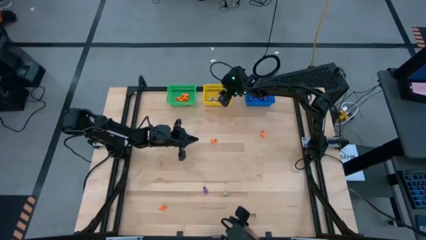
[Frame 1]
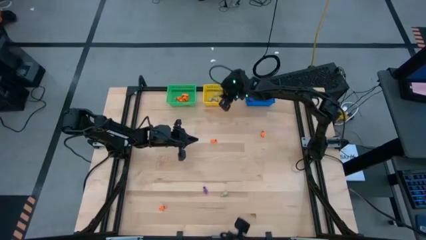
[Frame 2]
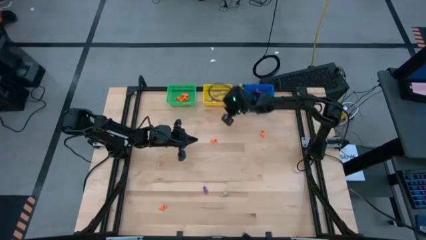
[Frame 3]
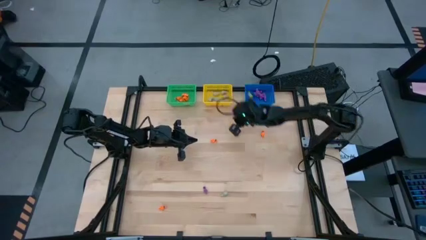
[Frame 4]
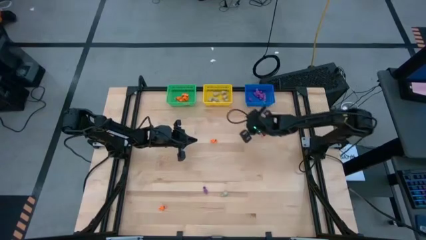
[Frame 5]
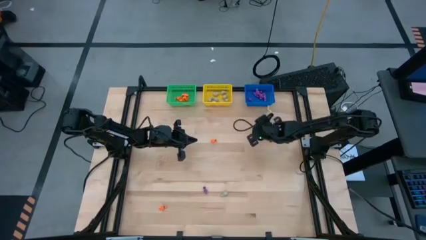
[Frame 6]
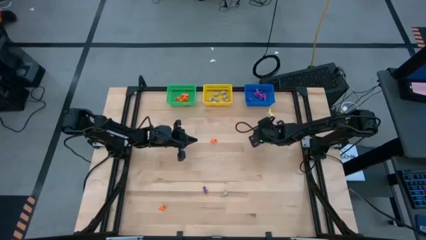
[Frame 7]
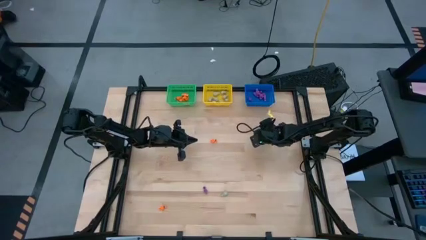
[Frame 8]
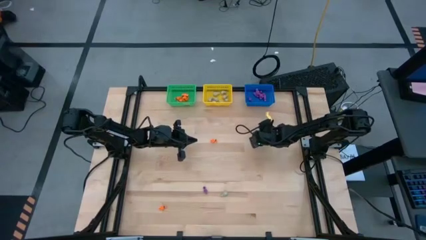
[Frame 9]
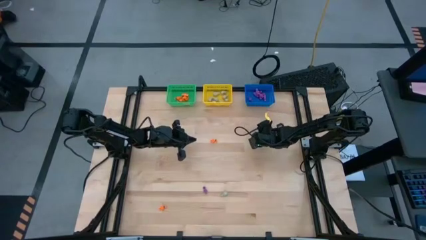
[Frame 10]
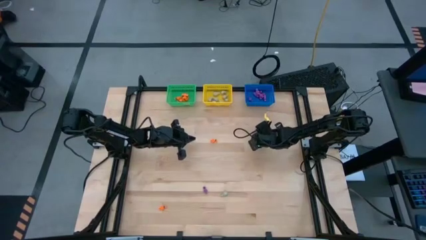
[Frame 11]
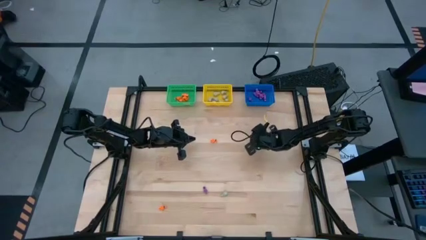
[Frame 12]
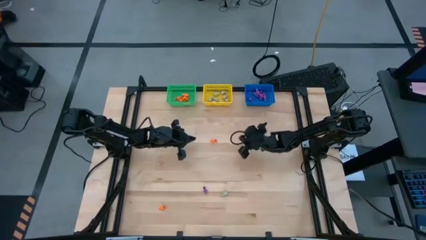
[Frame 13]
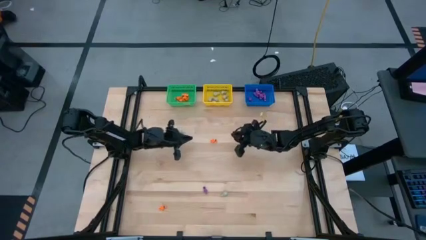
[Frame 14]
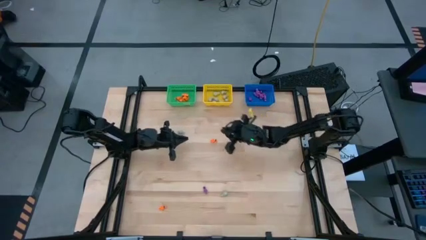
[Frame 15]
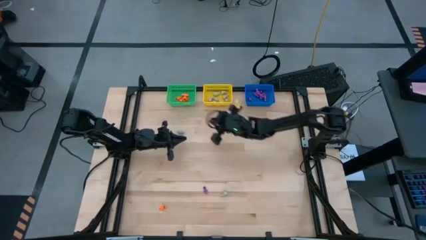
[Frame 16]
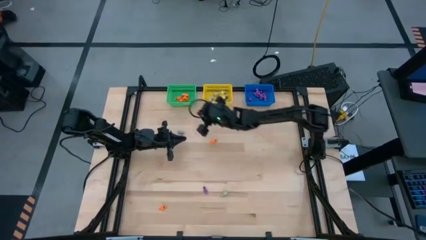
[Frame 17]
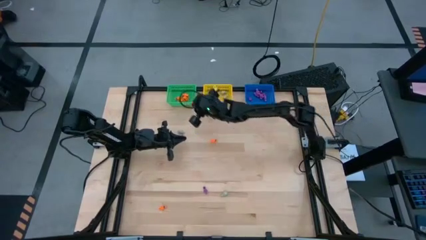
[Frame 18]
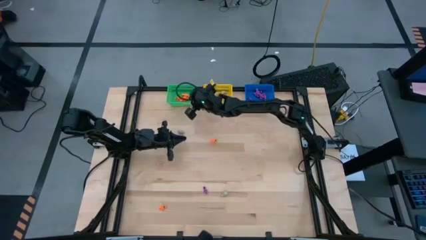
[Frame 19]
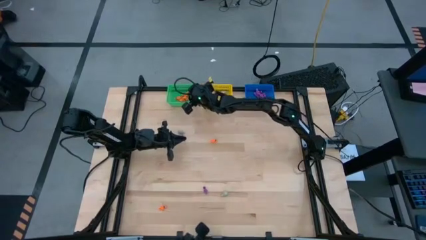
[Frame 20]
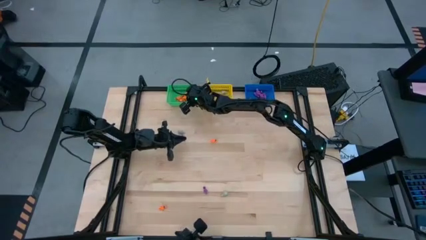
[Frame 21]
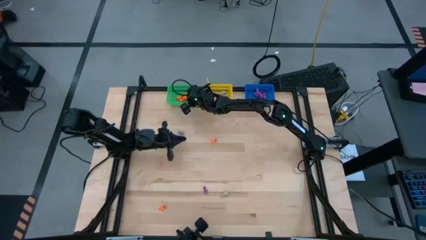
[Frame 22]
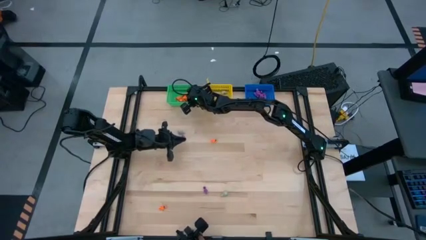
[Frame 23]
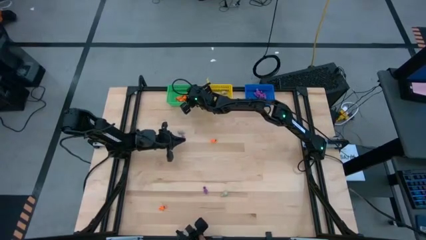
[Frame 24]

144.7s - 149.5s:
Task: Sort Halloween decoration
Put the orange skeleton toy into the green bin

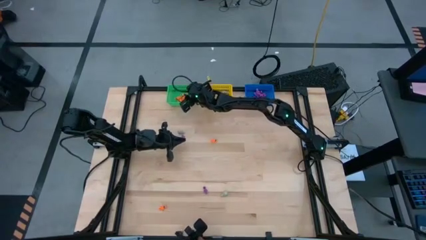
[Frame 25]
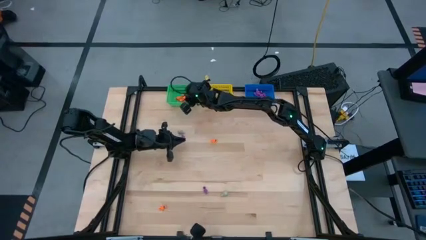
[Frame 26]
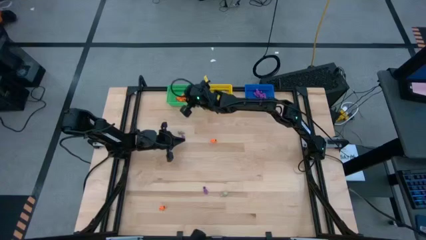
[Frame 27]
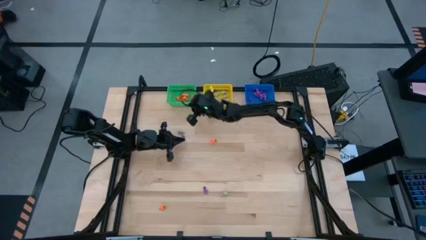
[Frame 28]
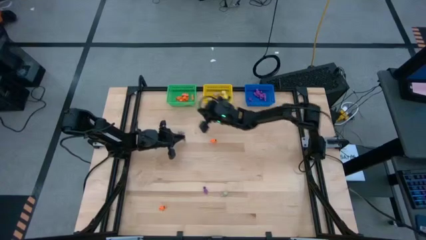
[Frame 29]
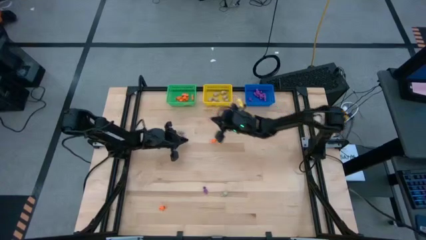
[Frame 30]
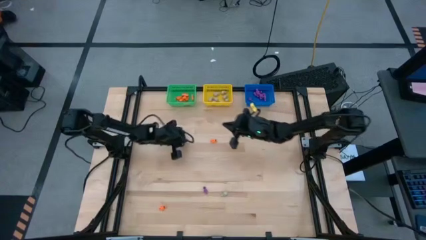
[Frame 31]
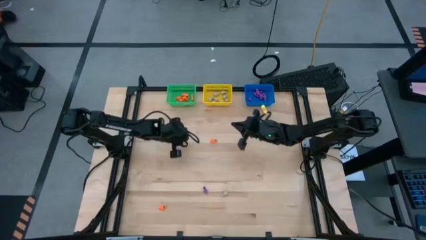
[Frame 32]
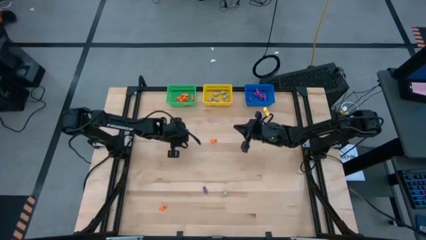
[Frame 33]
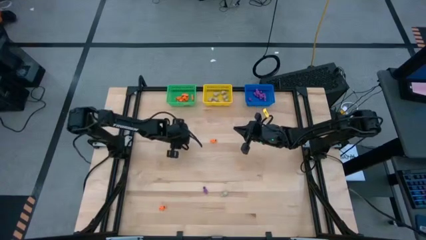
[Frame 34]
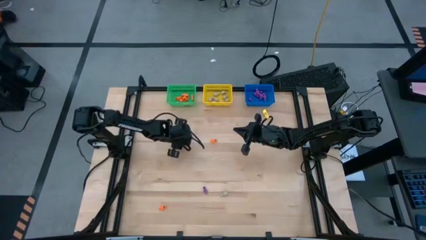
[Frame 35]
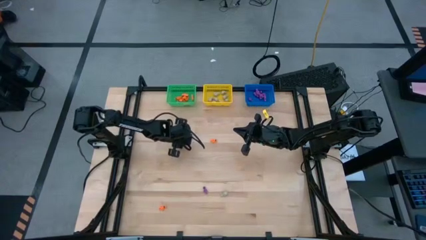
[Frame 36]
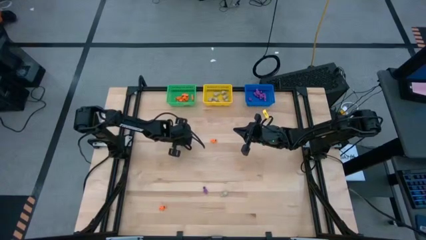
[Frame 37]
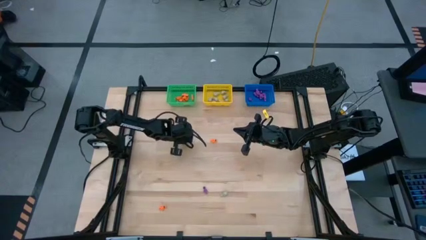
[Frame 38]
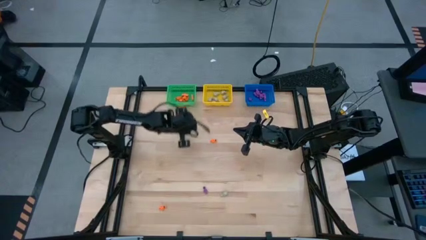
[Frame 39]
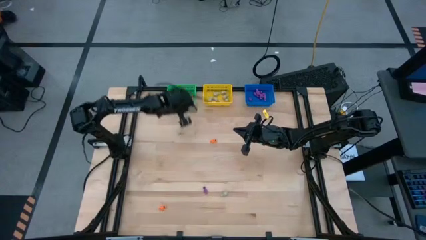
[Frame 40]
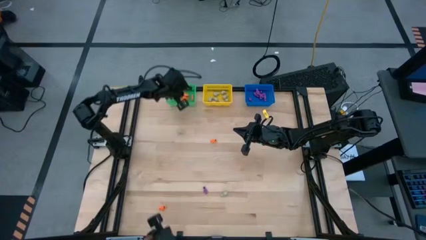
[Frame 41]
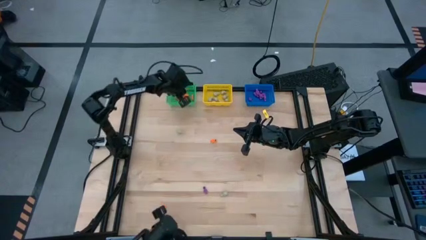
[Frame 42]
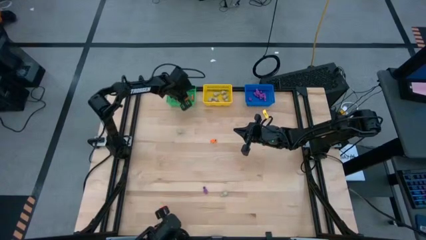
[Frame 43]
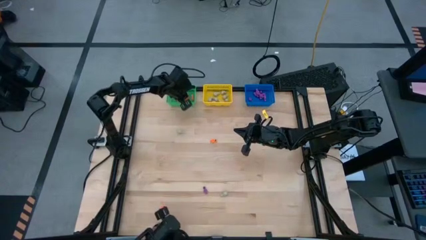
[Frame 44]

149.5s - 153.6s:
Put the violet skeleton toy into the blue bin

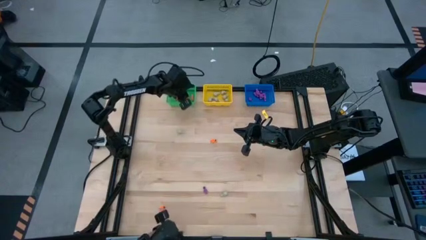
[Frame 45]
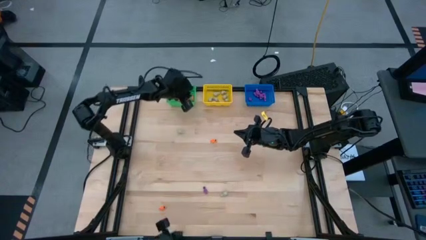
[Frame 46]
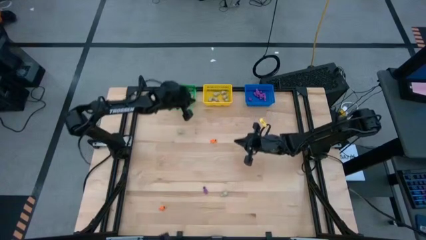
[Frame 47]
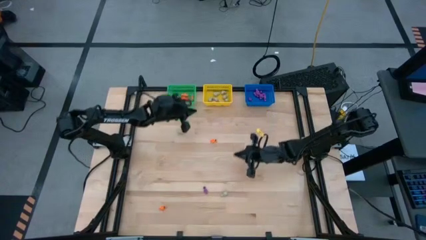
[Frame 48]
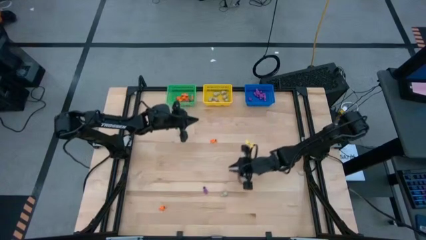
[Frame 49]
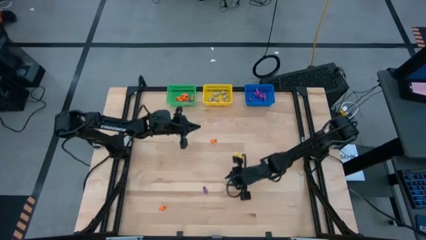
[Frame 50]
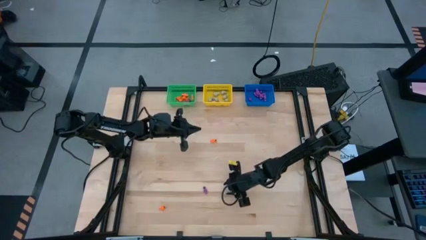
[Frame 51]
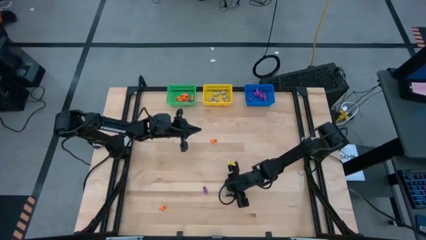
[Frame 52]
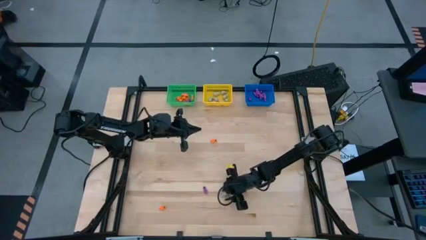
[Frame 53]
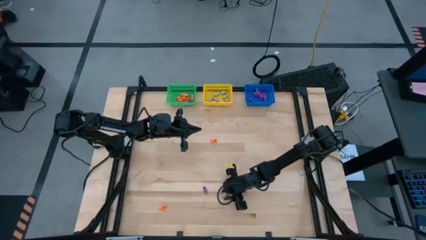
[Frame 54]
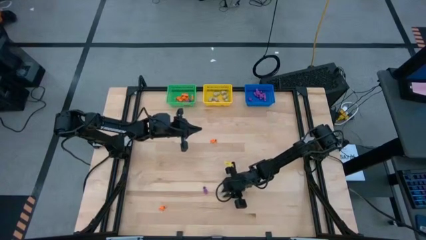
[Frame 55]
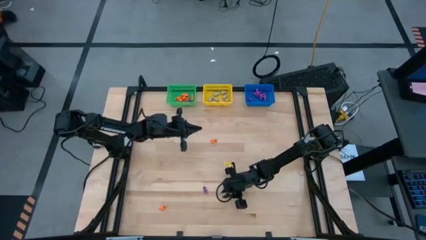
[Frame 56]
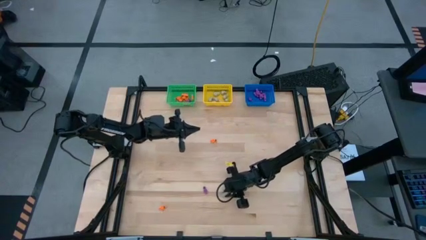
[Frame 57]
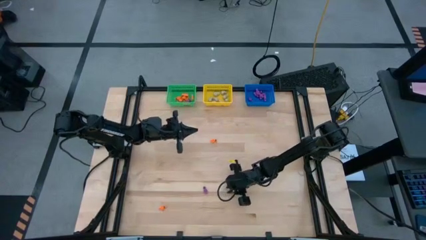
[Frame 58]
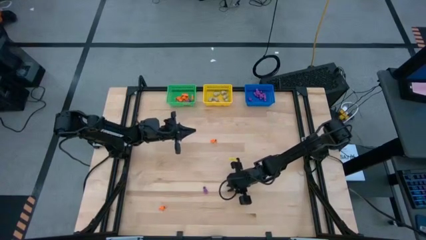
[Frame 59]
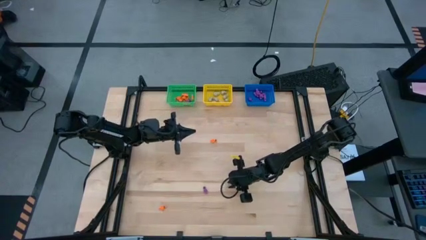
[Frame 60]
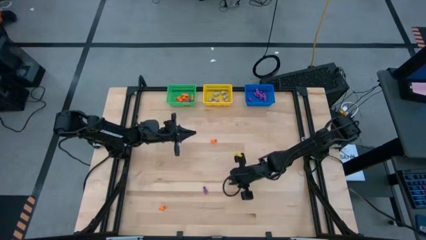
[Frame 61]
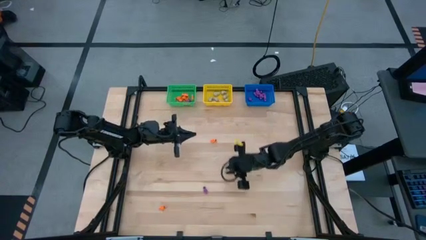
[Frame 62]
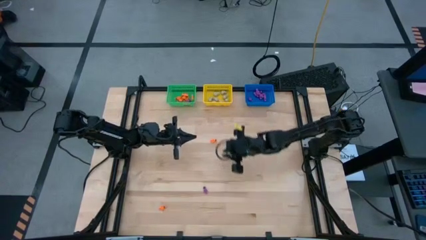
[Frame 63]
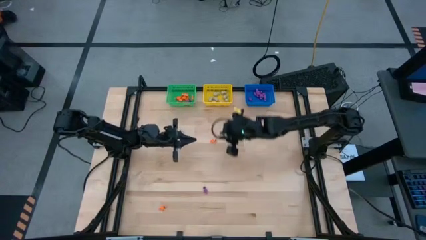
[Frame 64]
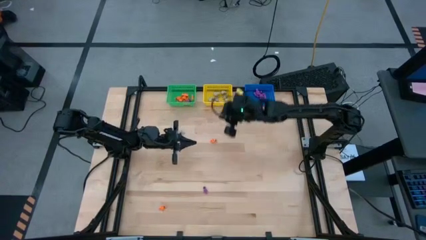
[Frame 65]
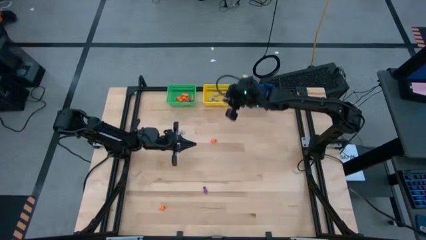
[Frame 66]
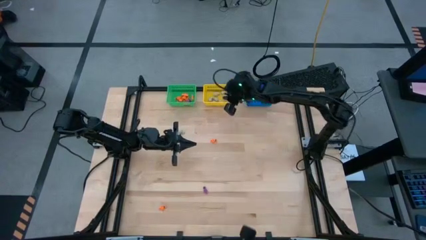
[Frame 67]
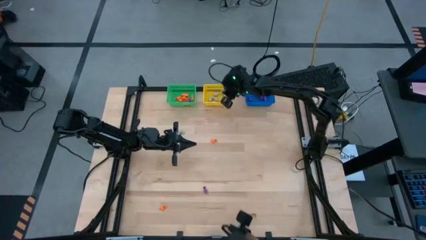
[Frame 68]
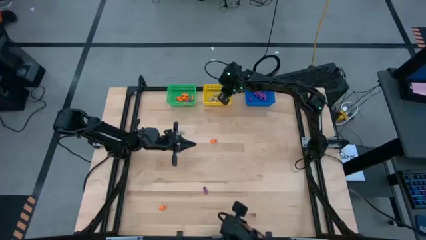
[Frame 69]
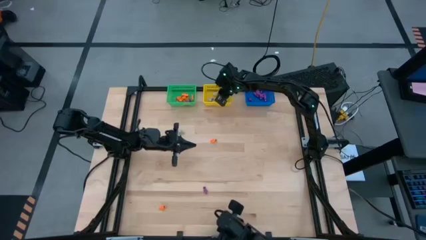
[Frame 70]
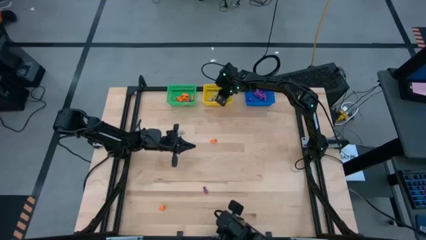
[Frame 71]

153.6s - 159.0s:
Put the white skull toy into the yellow bin
